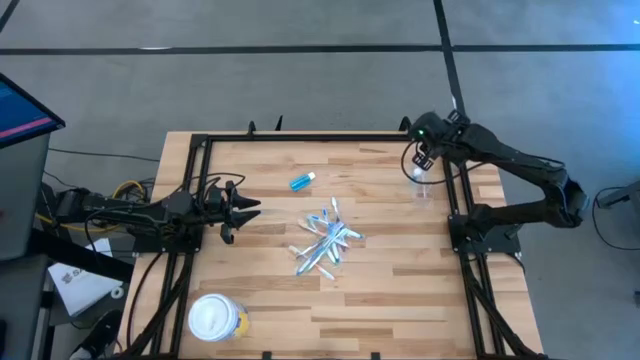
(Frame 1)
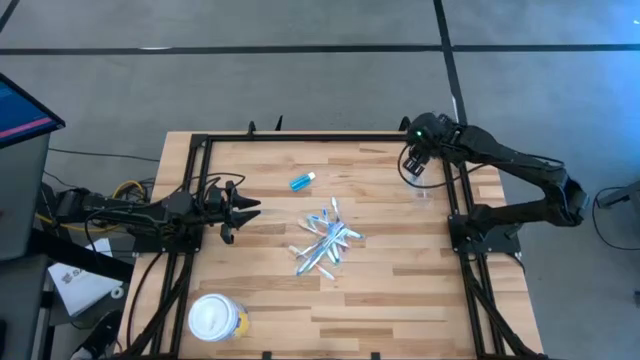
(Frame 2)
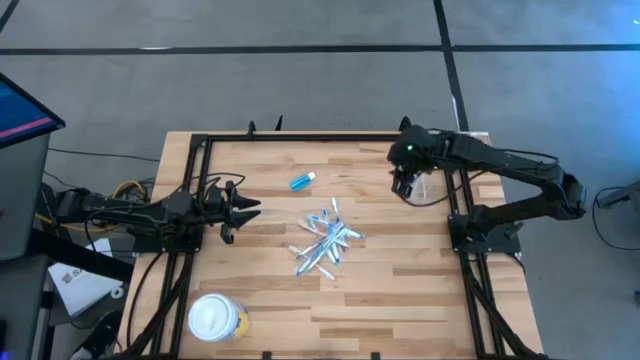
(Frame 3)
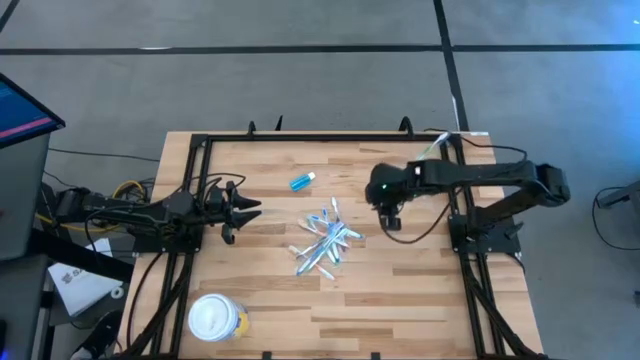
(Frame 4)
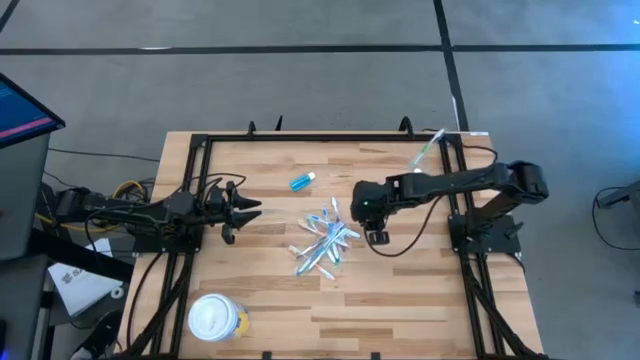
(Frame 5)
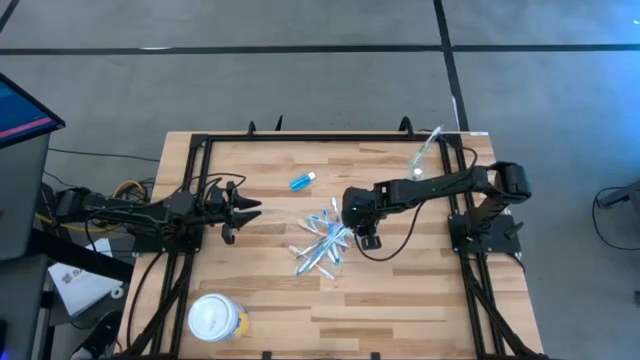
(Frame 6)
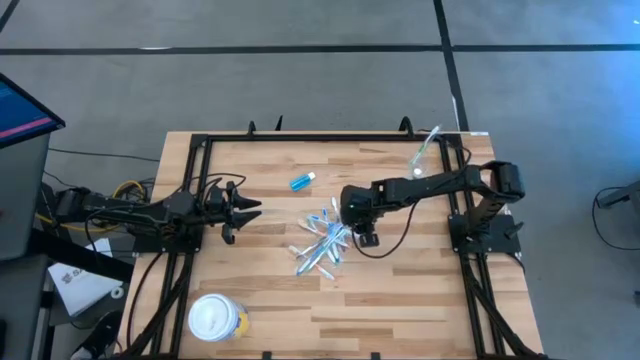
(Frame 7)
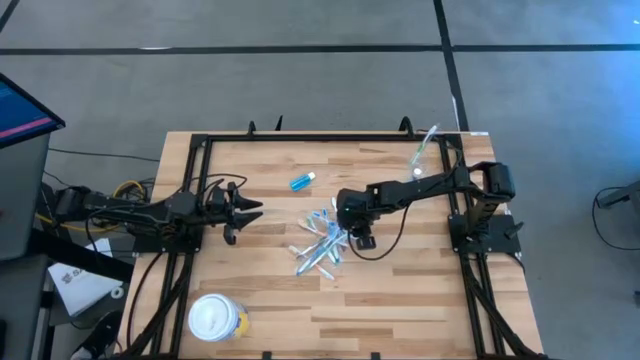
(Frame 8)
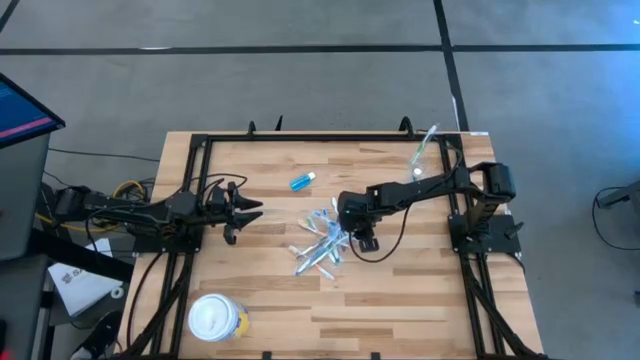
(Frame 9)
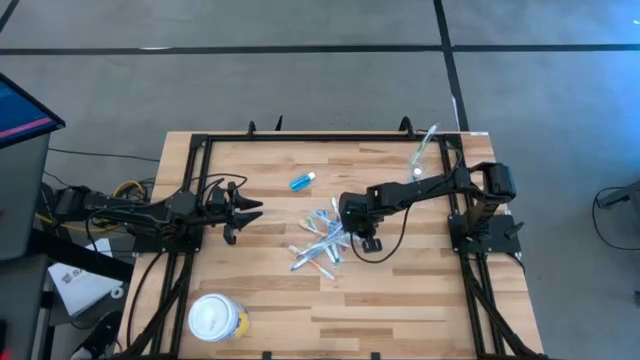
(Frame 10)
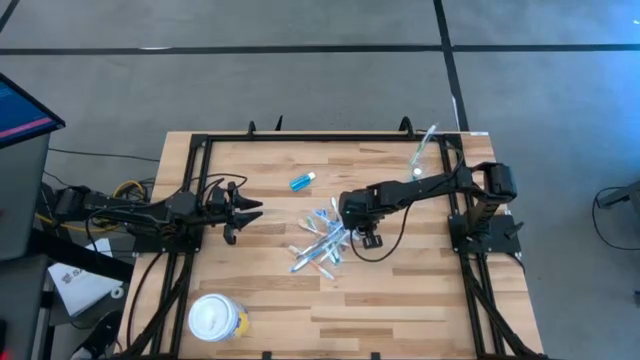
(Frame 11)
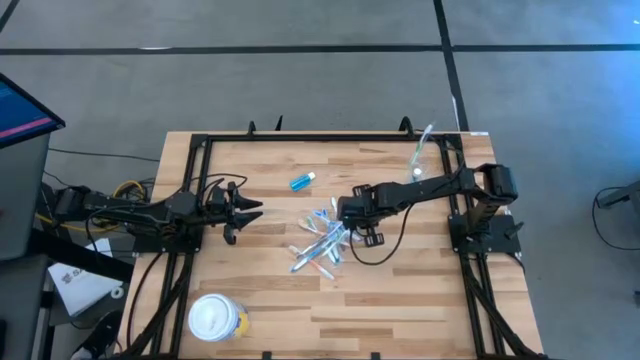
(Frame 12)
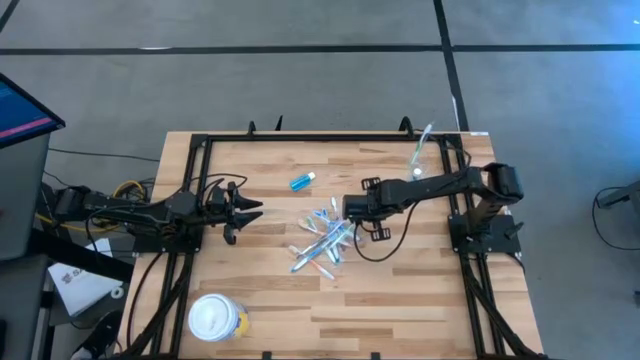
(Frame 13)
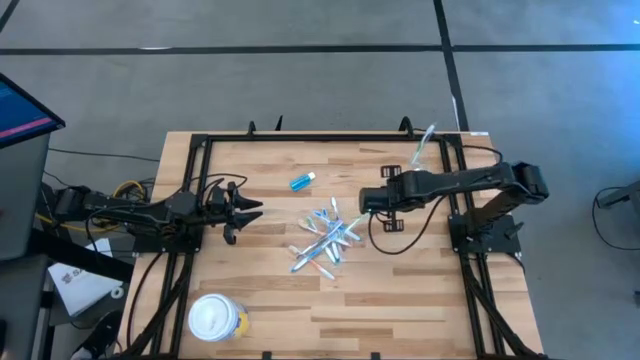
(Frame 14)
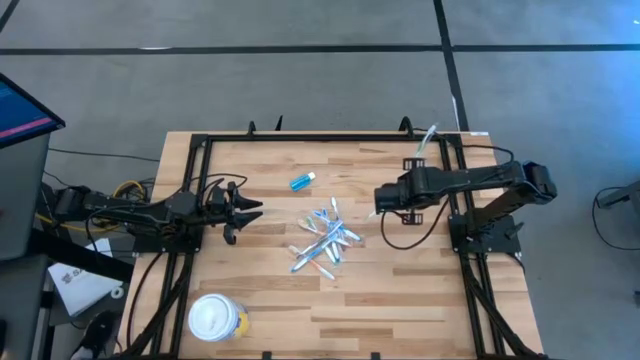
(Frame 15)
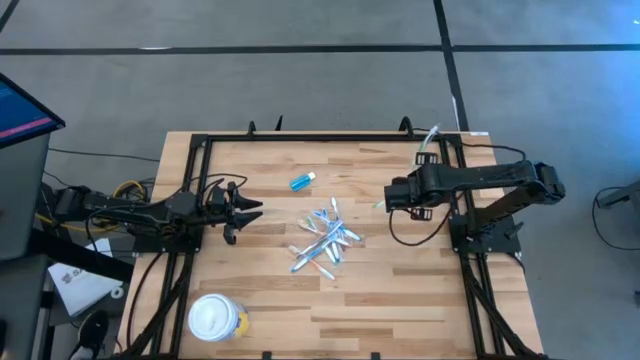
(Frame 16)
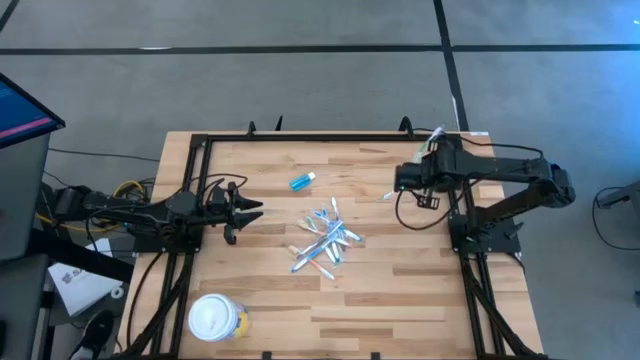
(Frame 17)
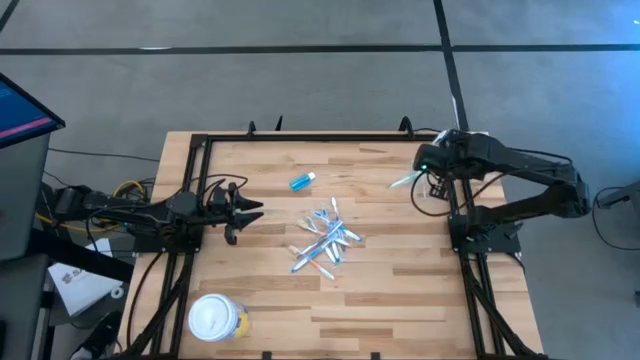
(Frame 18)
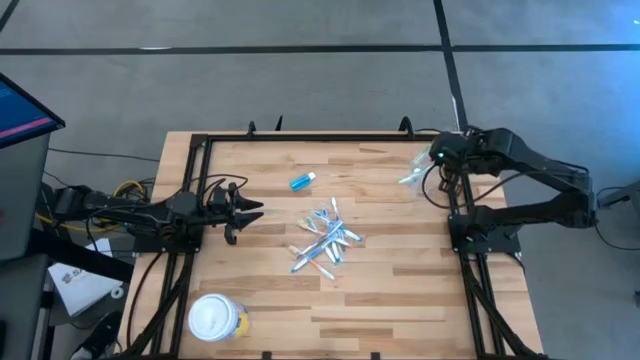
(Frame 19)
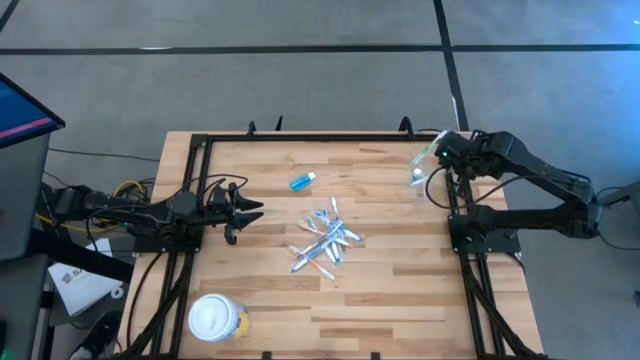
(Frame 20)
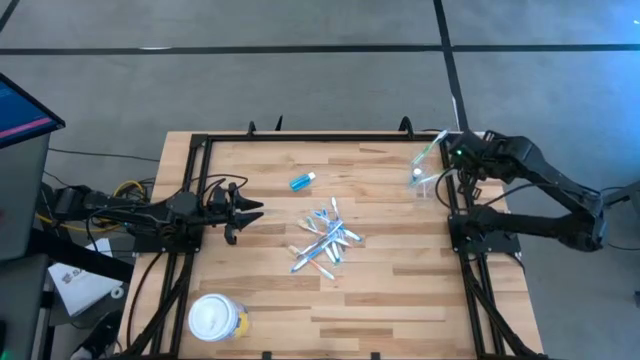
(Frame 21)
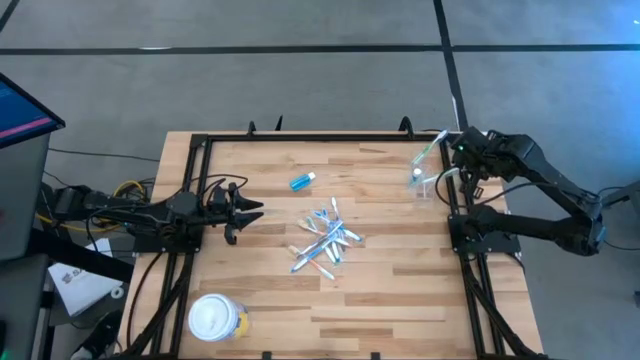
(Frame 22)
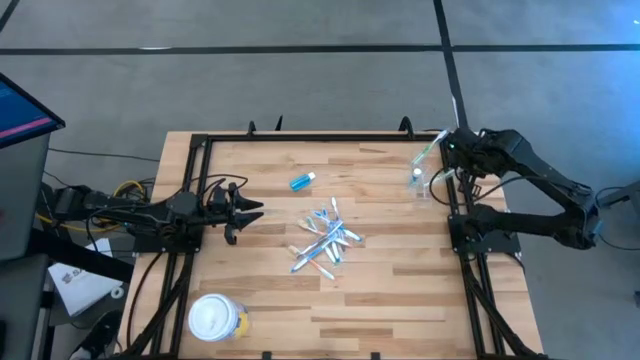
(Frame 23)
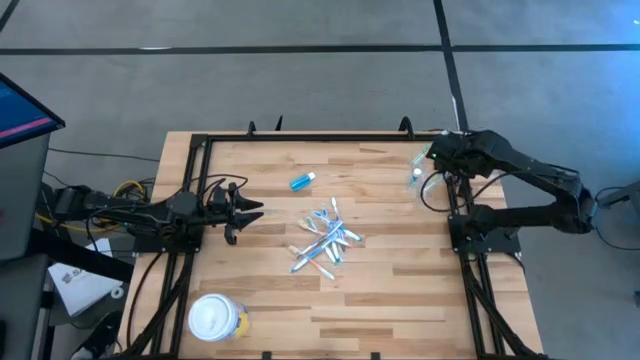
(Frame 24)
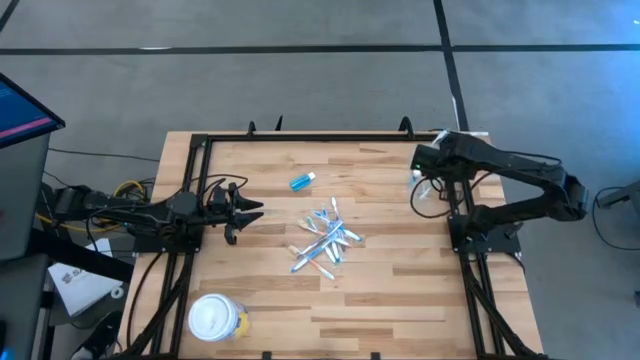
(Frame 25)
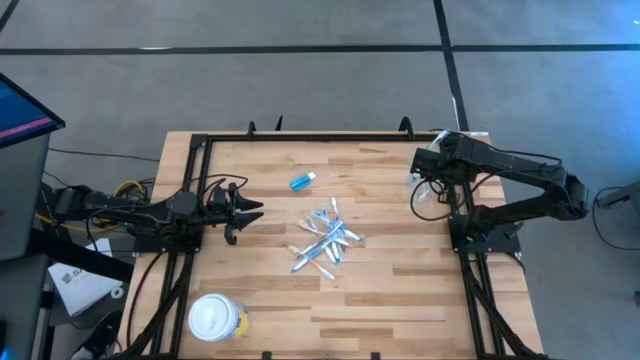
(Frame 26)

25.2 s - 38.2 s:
Task: Pick & Place toothbrushing station
Put the green toothbrush into the transparent organizer

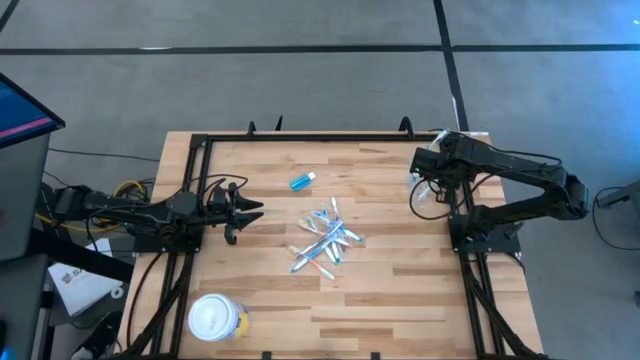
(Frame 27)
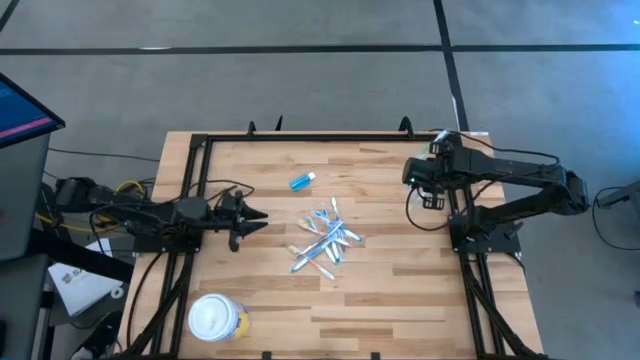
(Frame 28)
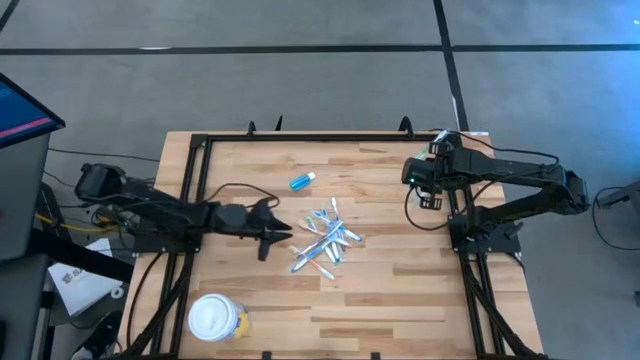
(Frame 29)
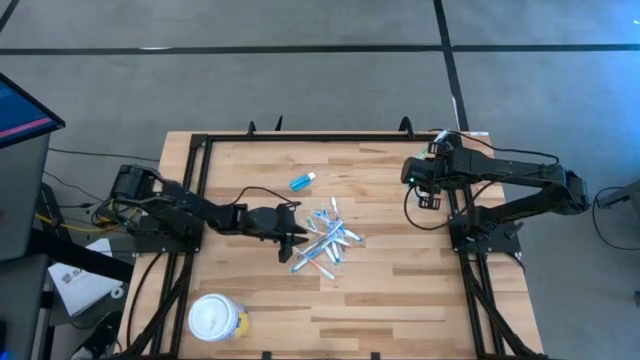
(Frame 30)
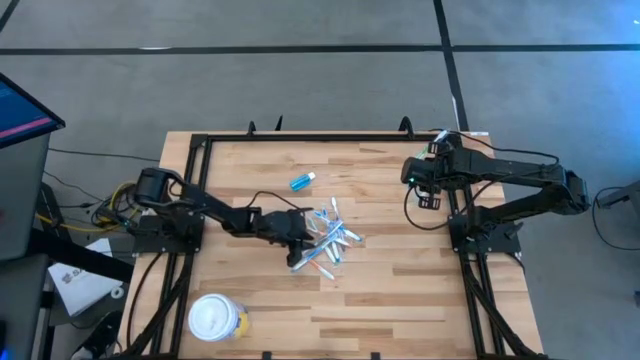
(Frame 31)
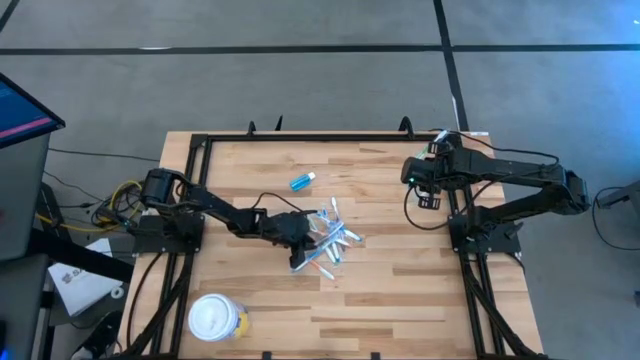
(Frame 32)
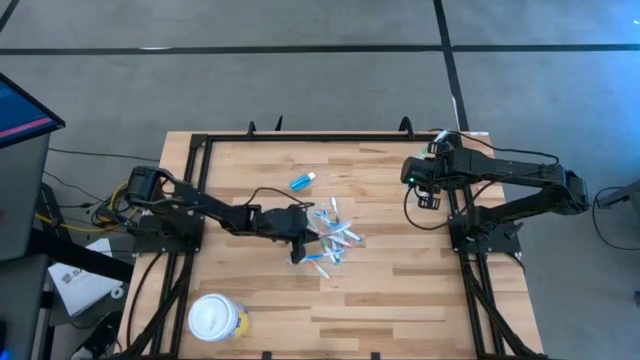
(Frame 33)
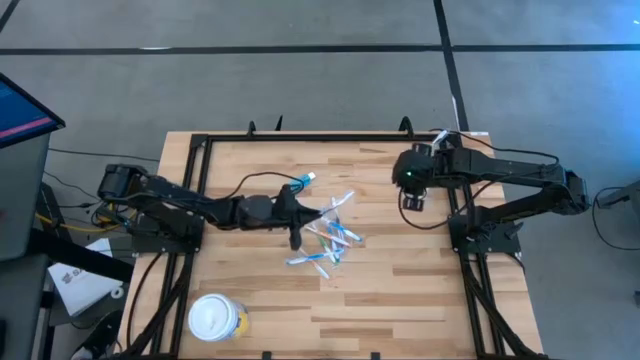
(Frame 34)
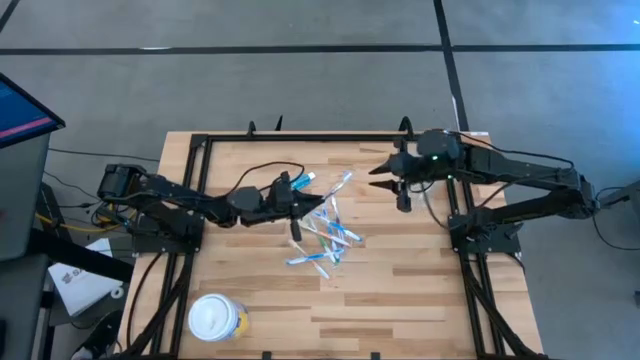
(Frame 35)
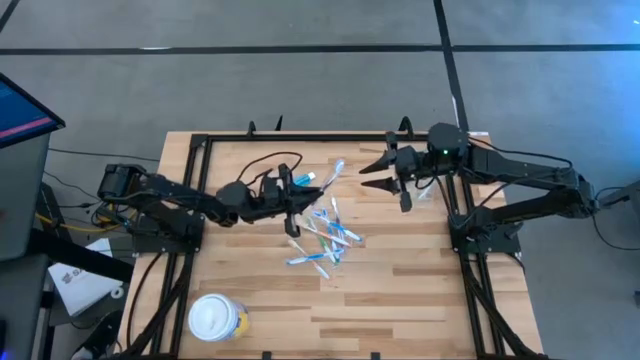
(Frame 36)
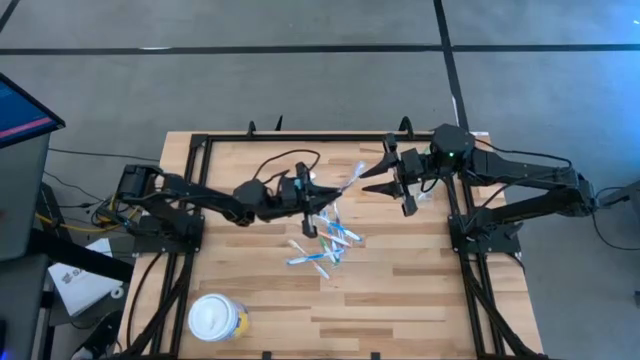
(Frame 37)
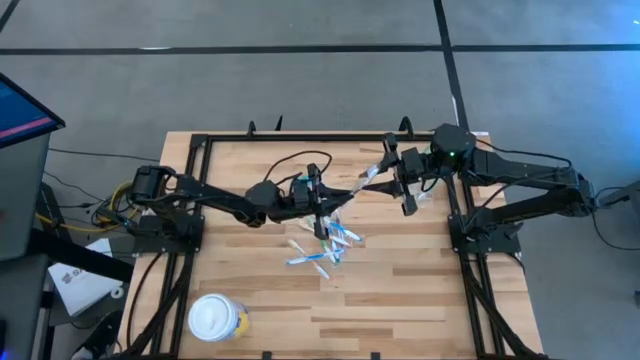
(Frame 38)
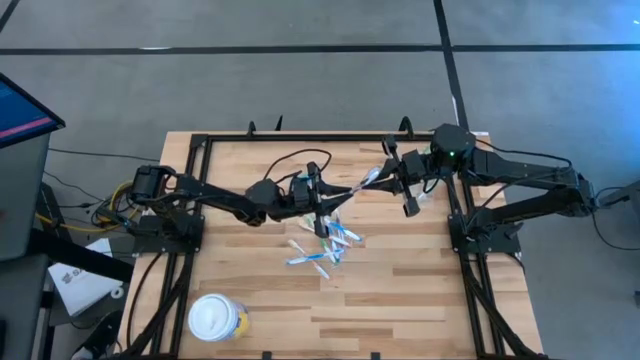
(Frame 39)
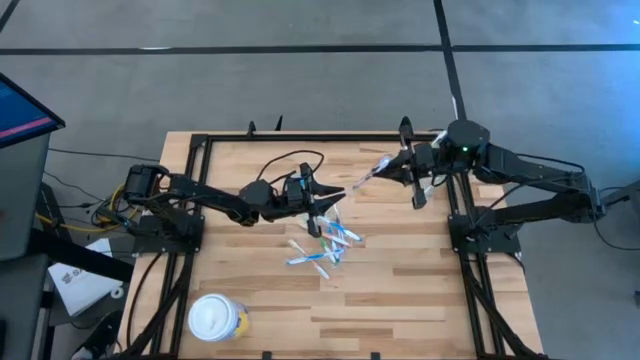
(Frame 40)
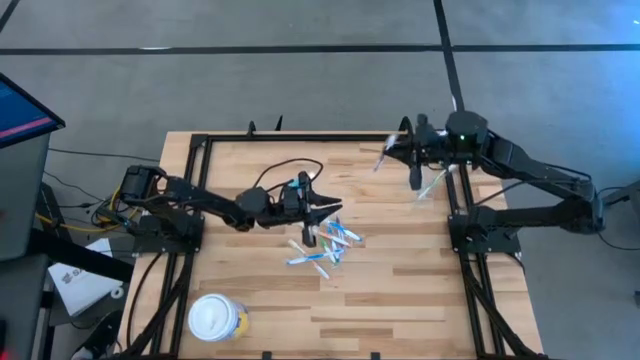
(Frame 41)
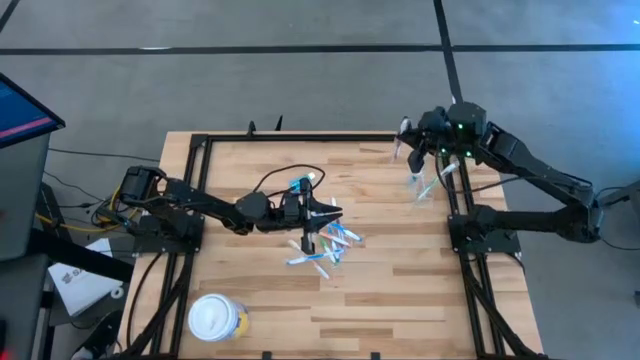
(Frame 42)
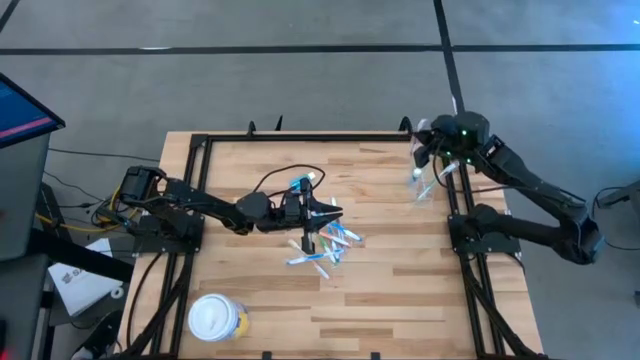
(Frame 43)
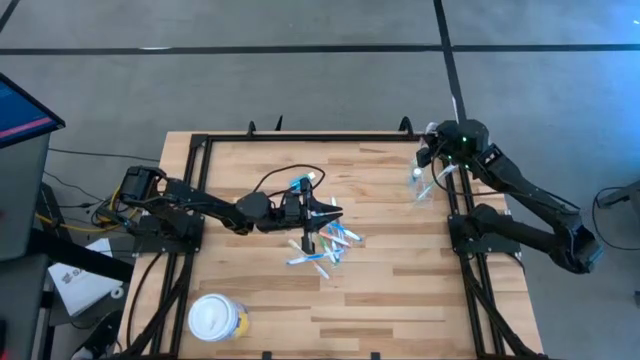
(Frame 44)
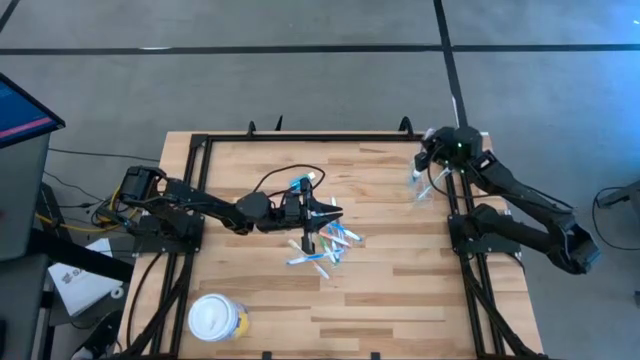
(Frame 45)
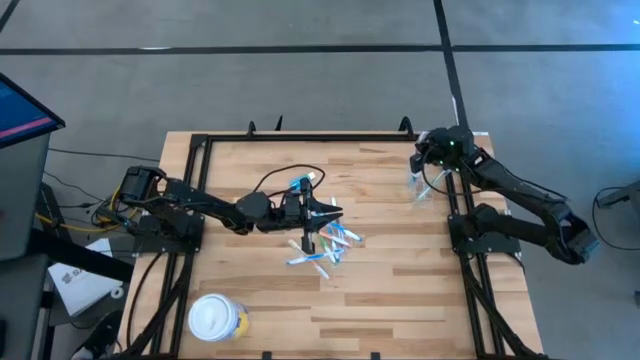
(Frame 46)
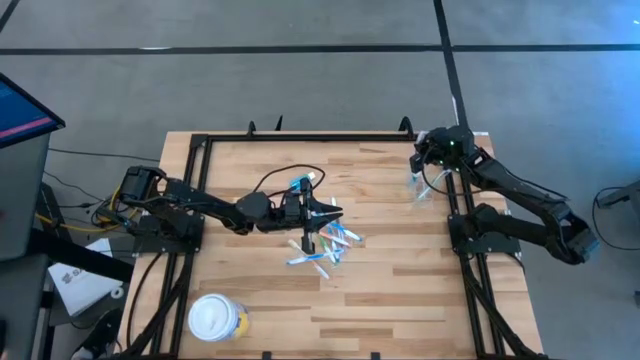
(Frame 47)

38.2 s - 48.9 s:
Put the purple toothbrush into the transparent organizer
